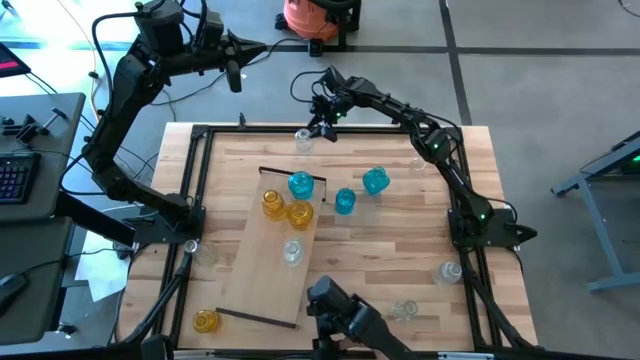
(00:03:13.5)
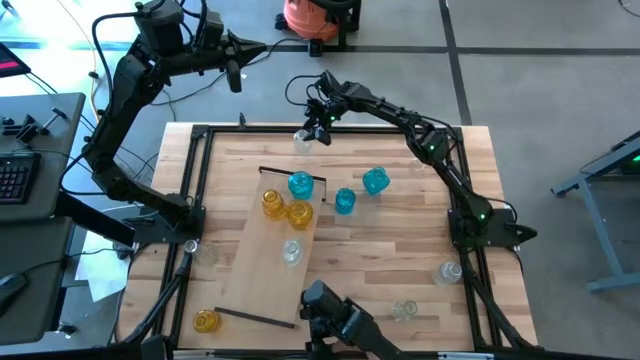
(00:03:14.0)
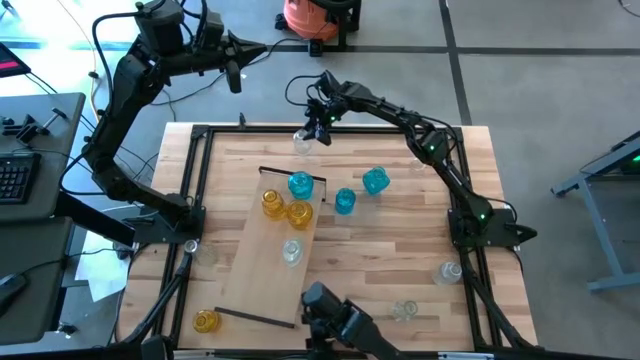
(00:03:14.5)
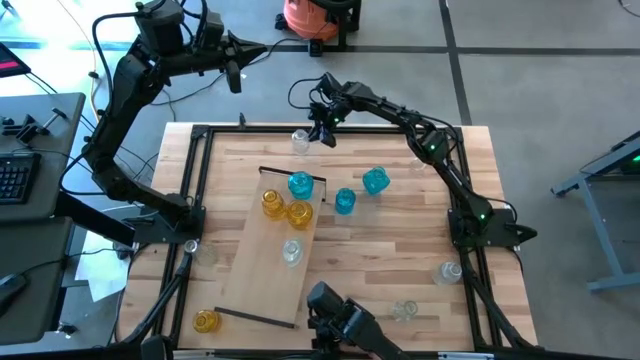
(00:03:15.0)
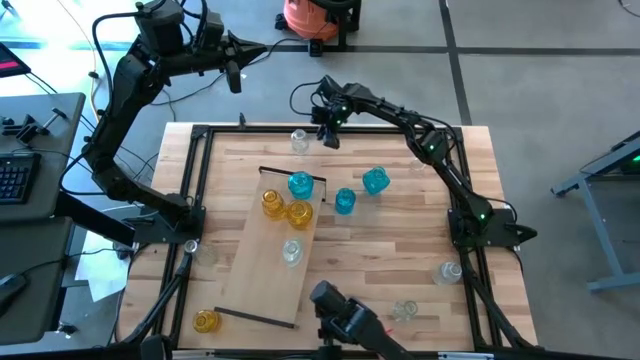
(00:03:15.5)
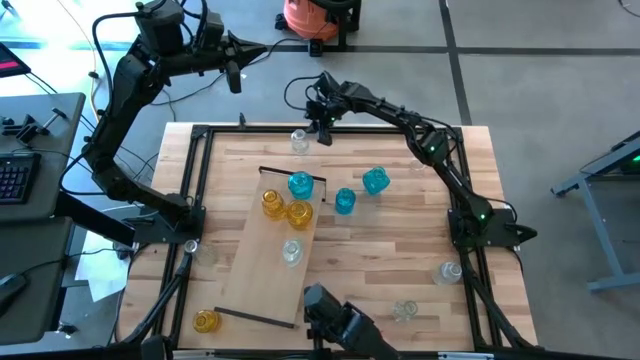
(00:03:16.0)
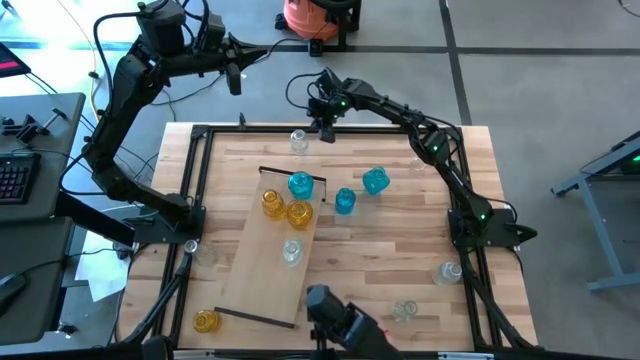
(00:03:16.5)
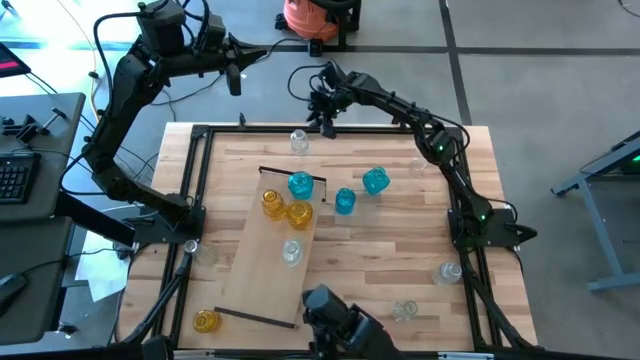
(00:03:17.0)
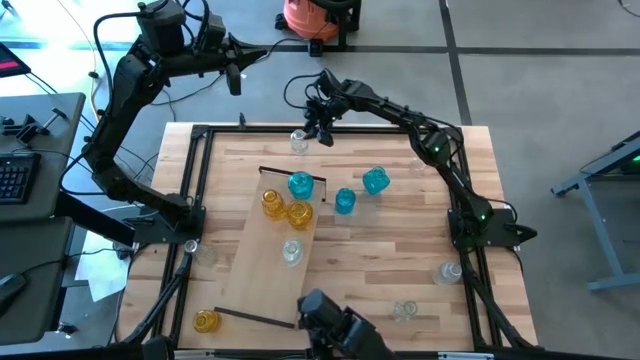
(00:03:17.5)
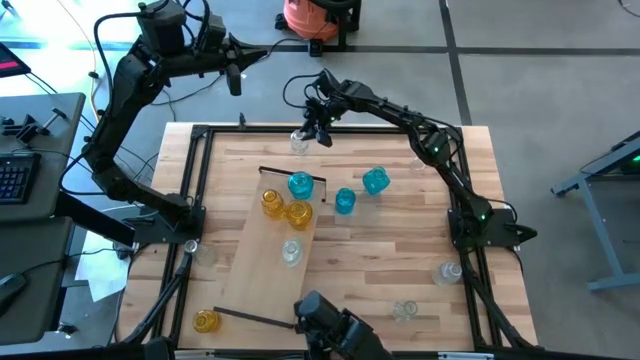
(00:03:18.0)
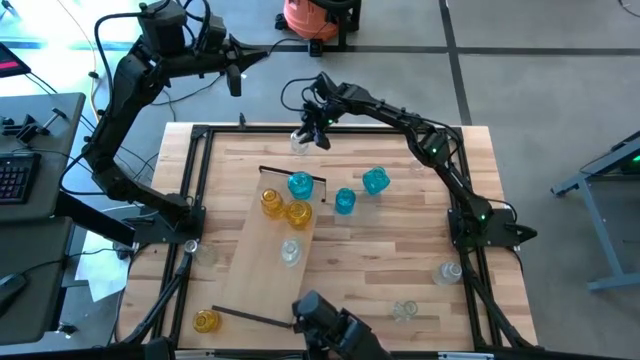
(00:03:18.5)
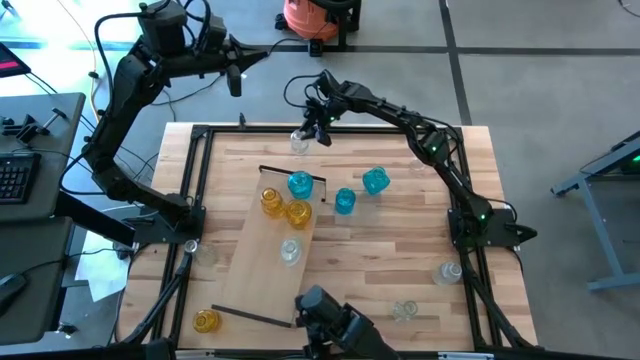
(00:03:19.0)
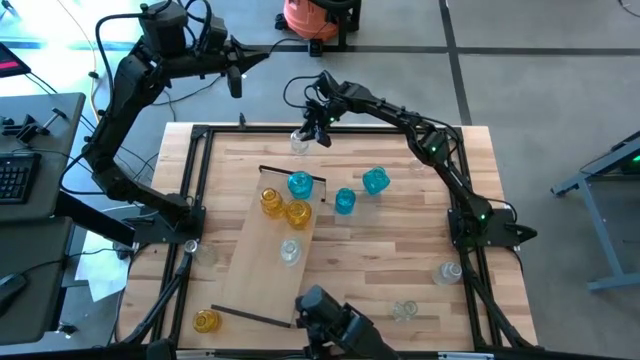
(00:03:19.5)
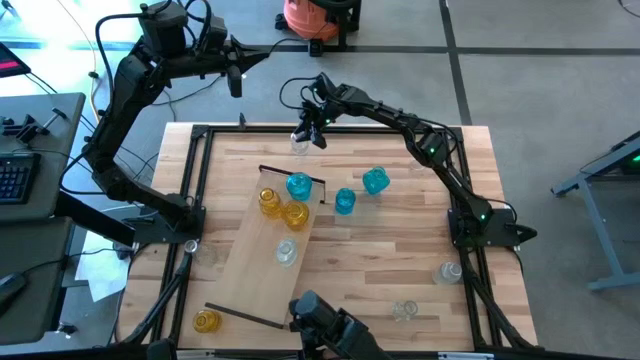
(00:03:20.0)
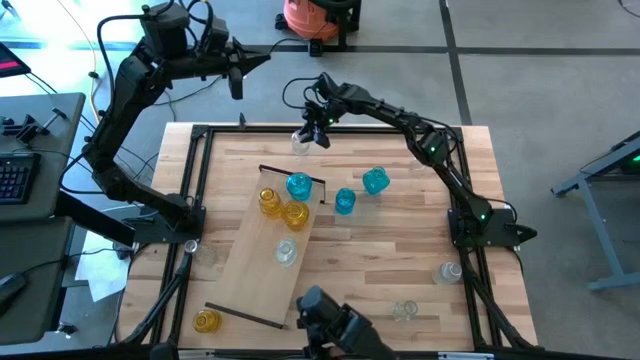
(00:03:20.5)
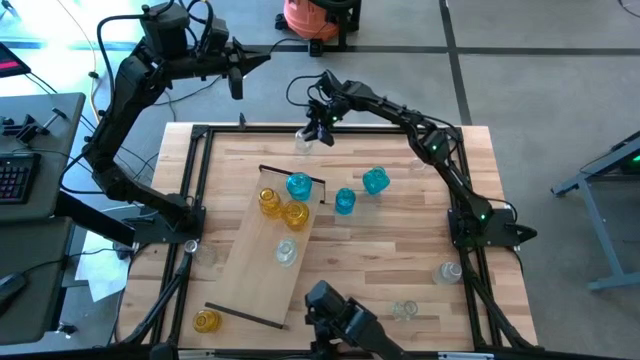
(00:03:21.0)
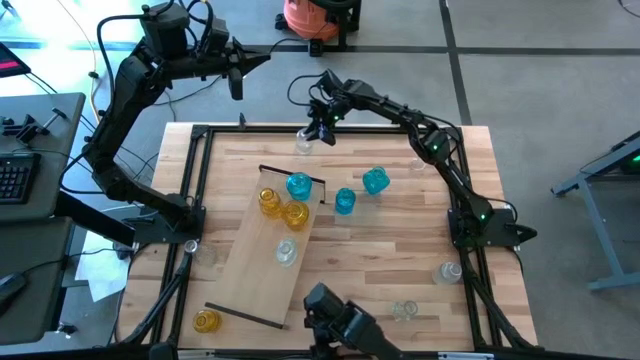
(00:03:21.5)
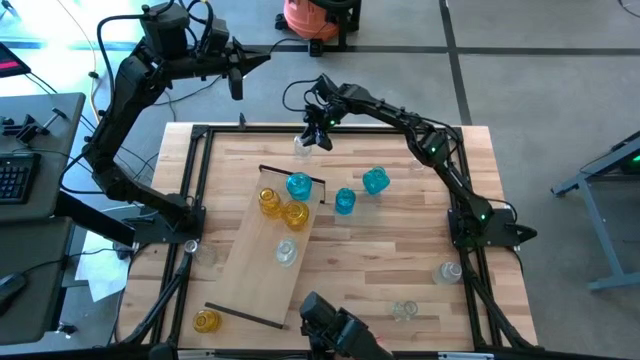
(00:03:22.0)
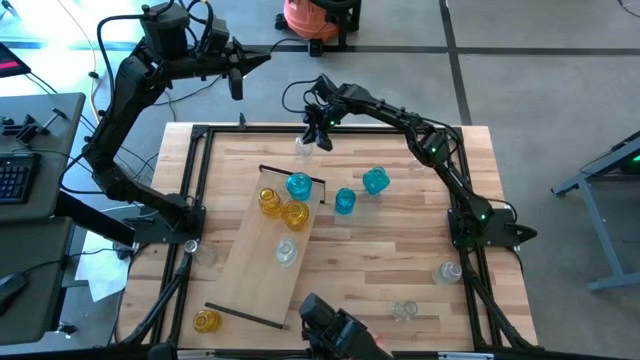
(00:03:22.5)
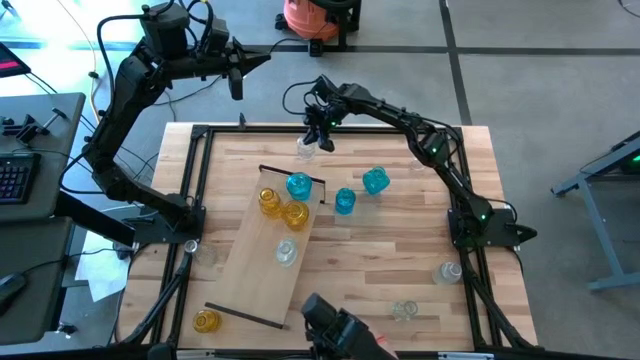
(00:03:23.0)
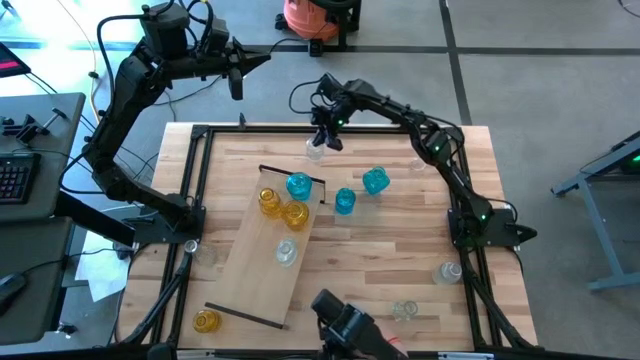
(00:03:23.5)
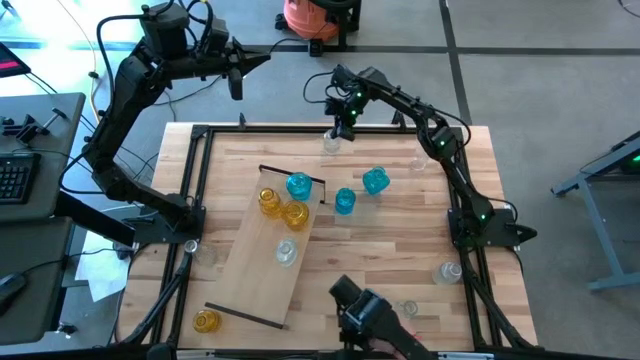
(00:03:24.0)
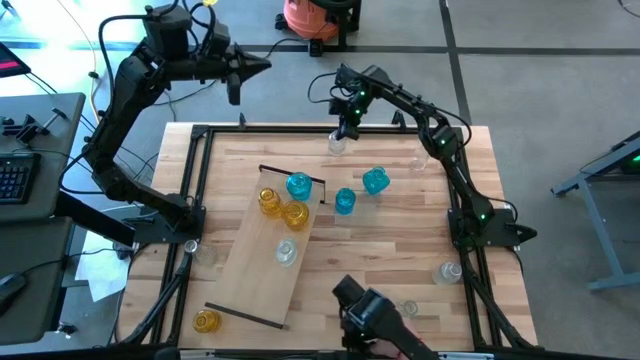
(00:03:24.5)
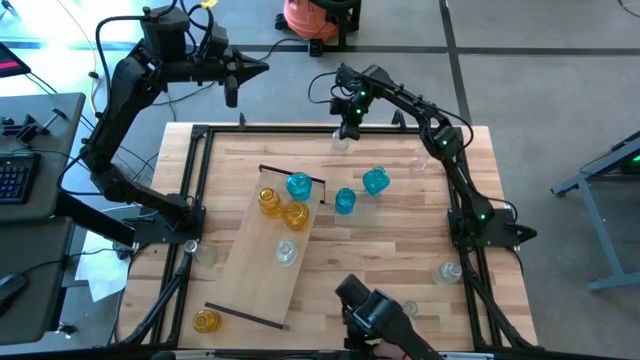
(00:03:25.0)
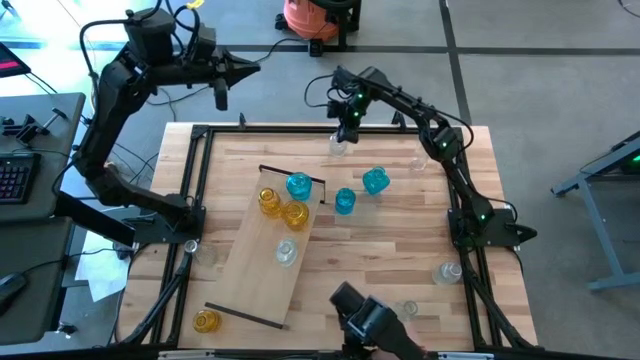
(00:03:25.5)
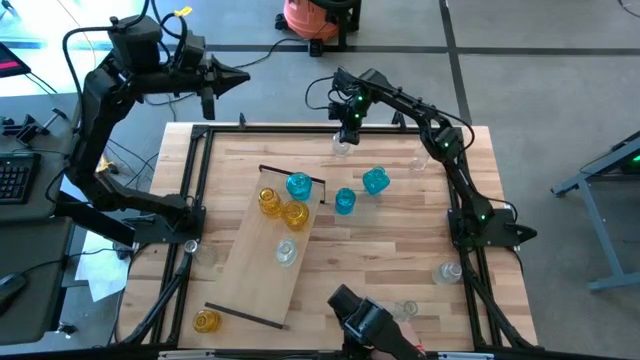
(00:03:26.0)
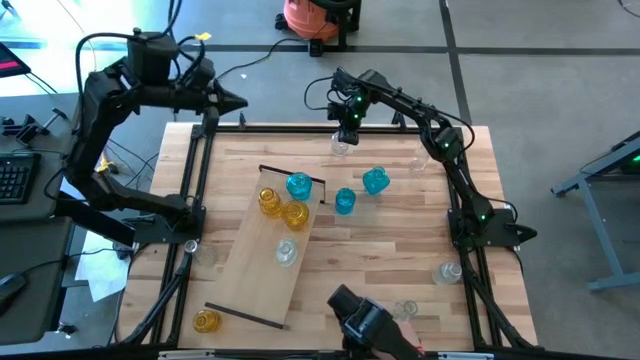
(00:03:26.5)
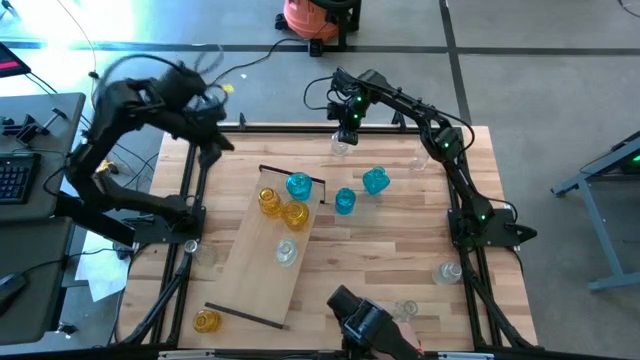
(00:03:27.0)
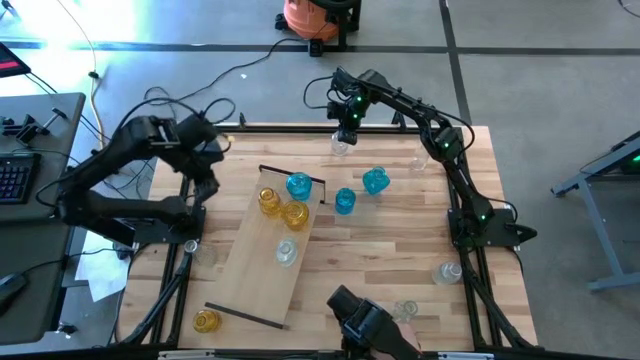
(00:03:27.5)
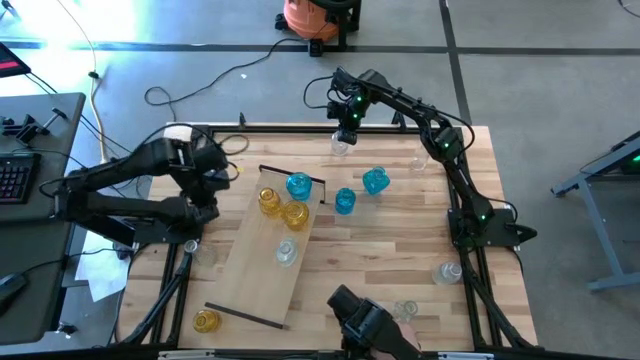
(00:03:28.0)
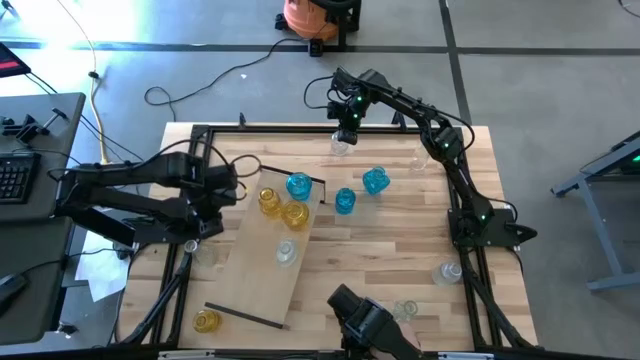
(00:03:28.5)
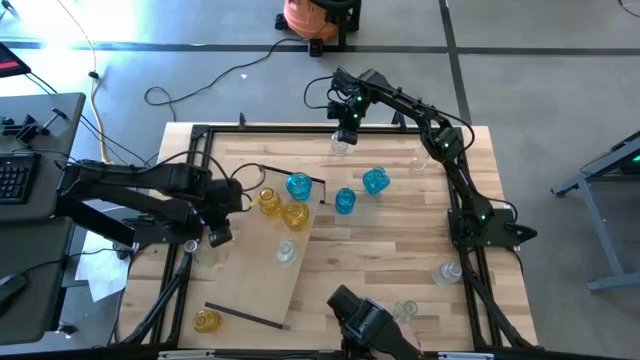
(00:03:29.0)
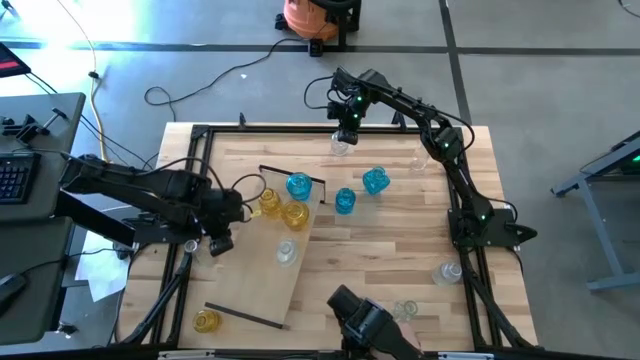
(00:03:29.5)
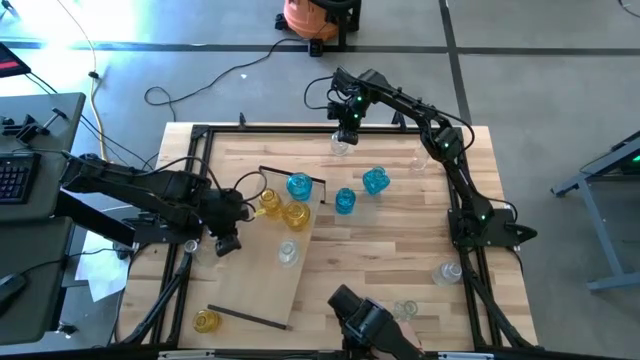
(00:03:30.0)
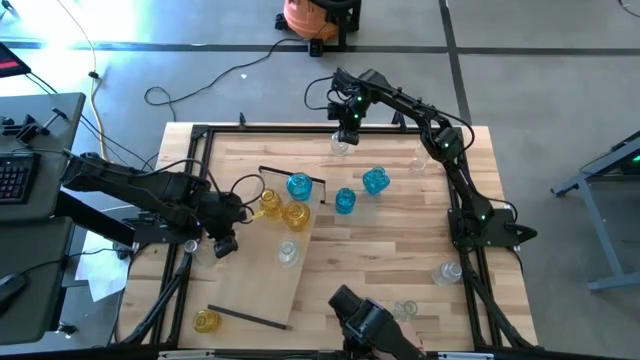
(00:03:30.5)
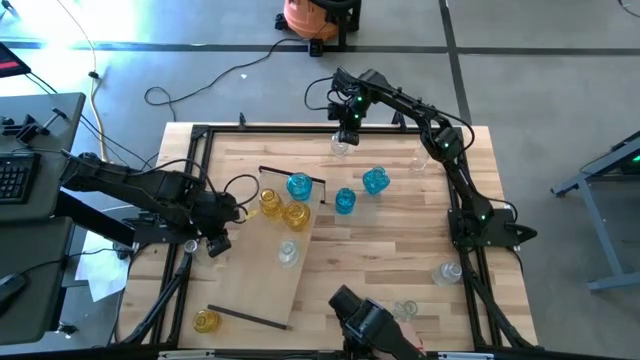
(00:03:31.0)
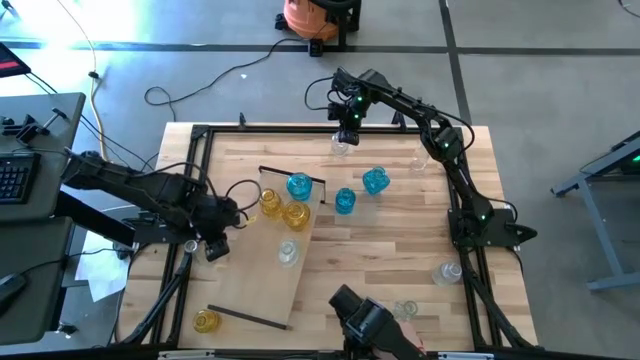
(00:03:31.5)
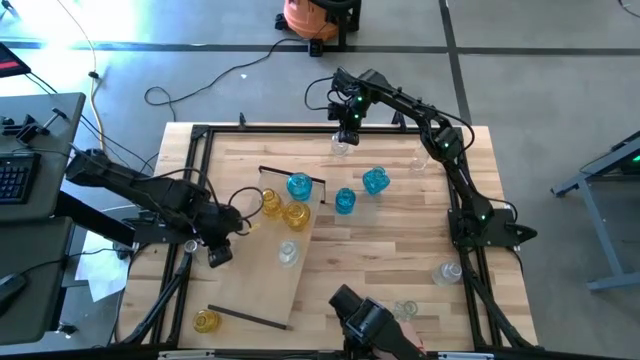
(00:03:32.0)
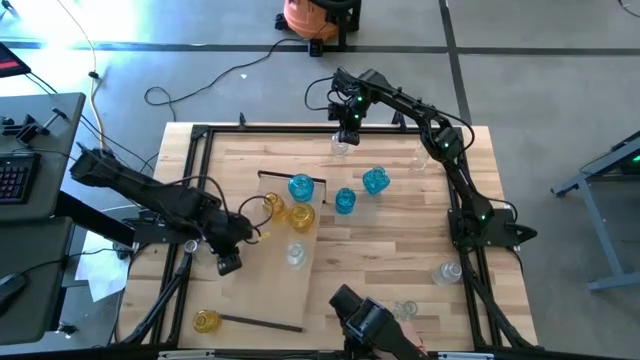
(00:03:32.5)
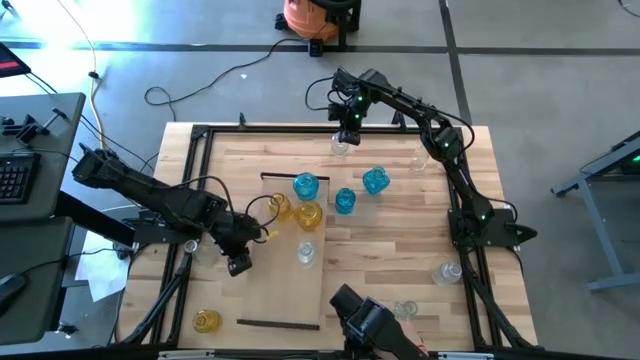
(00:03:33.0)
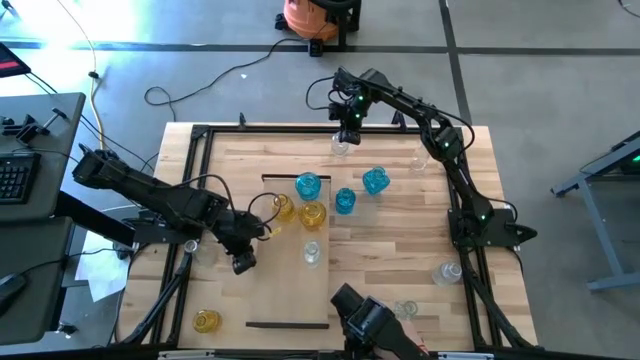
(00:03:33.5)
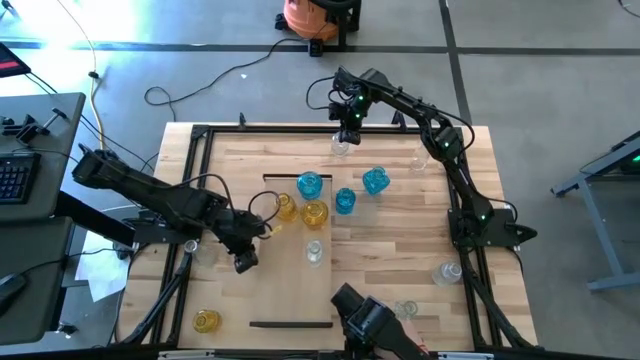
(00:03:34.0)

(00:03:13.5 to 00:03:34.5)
Task: sort vases onto shelf
Adjust the shelf on the table
